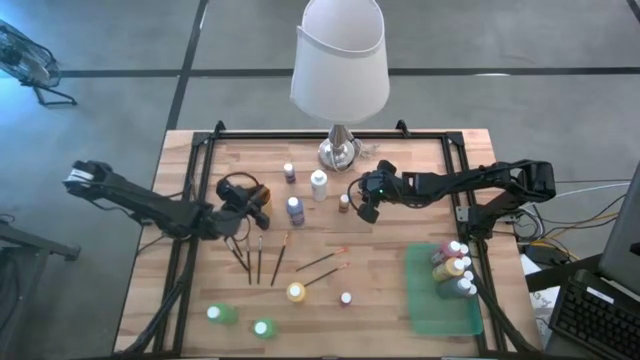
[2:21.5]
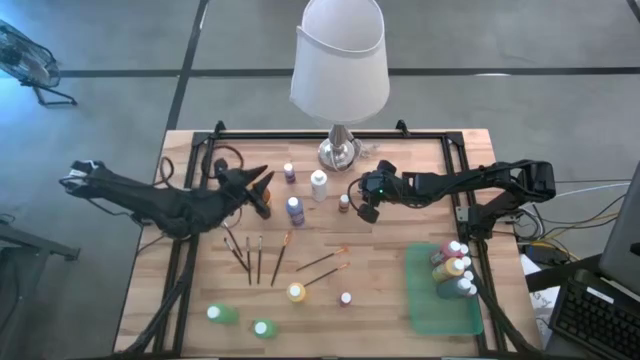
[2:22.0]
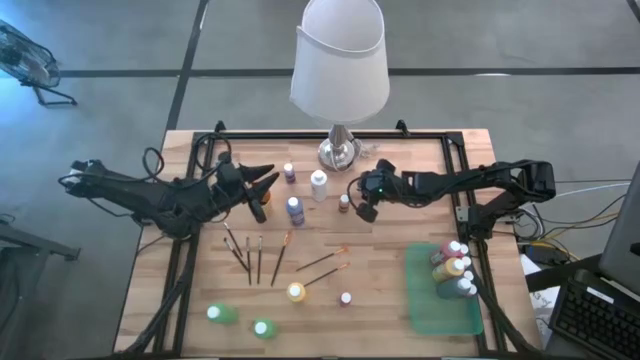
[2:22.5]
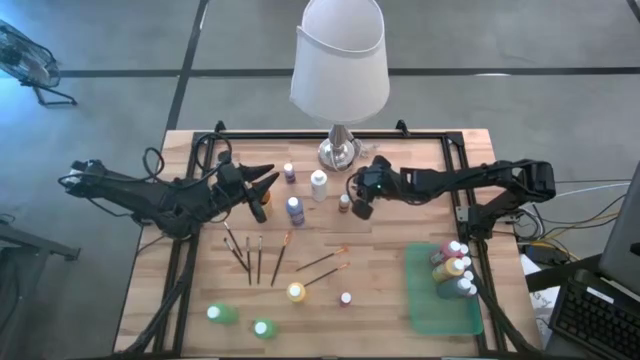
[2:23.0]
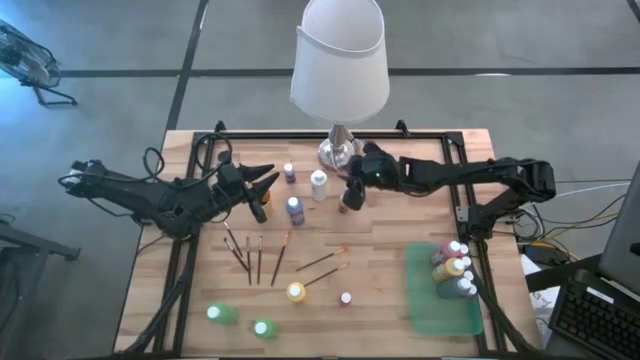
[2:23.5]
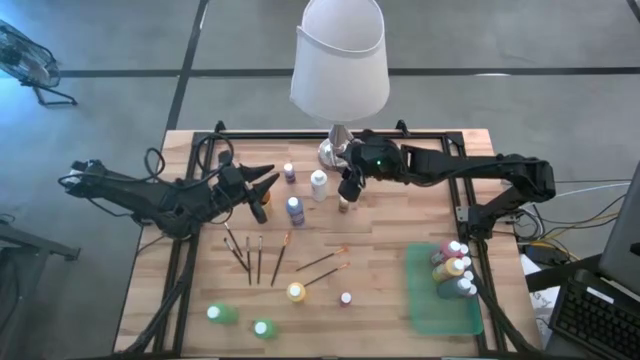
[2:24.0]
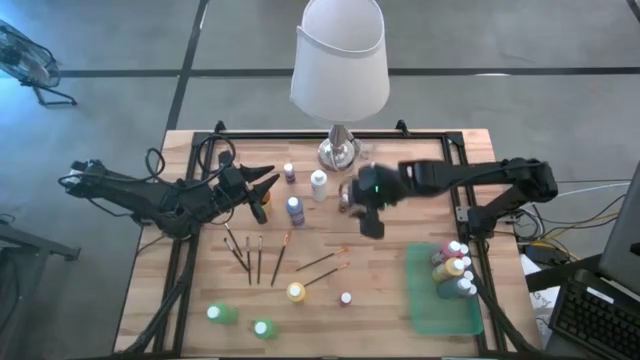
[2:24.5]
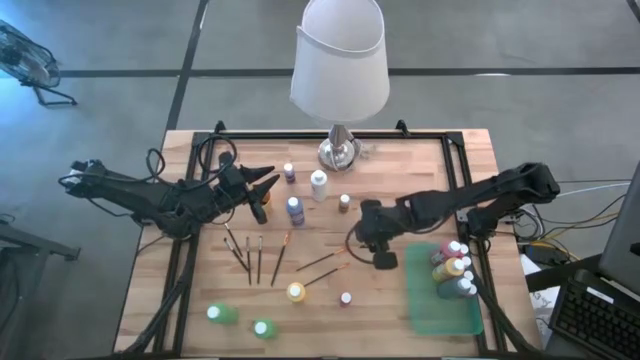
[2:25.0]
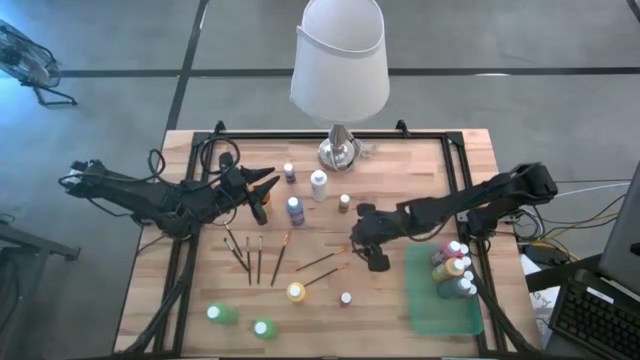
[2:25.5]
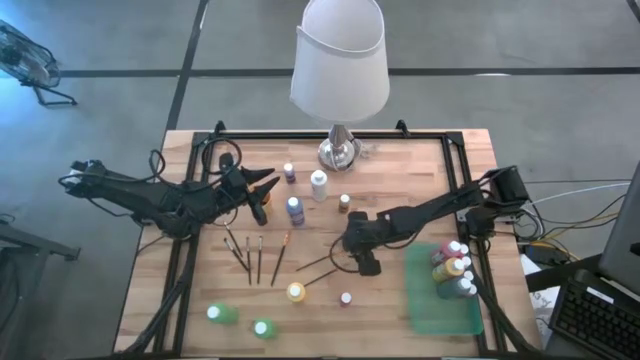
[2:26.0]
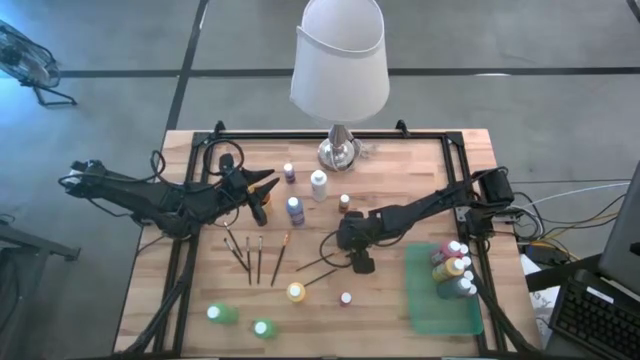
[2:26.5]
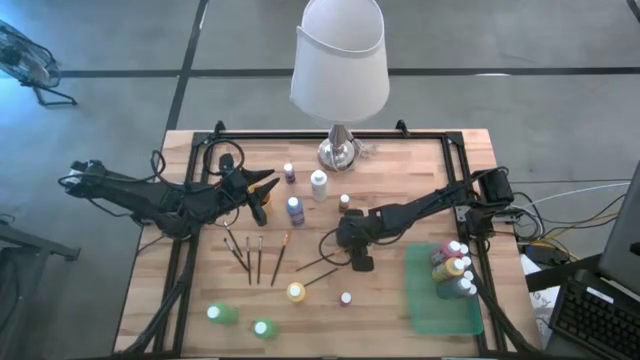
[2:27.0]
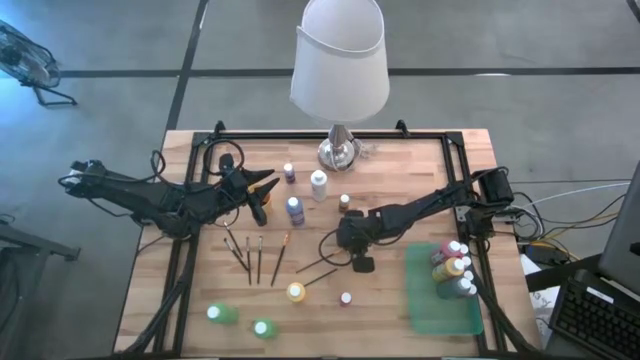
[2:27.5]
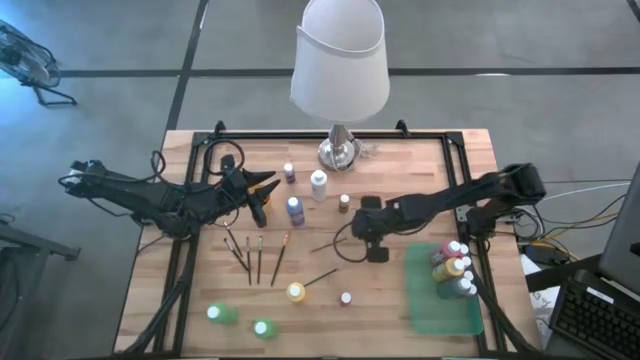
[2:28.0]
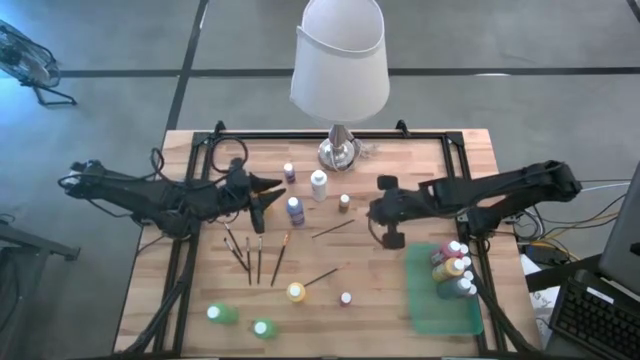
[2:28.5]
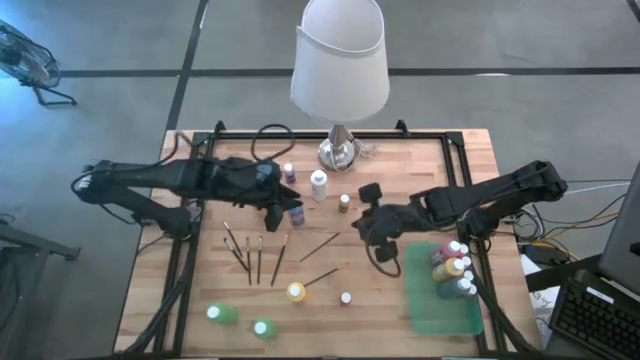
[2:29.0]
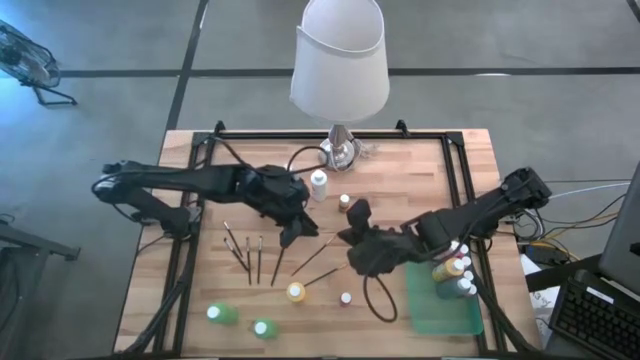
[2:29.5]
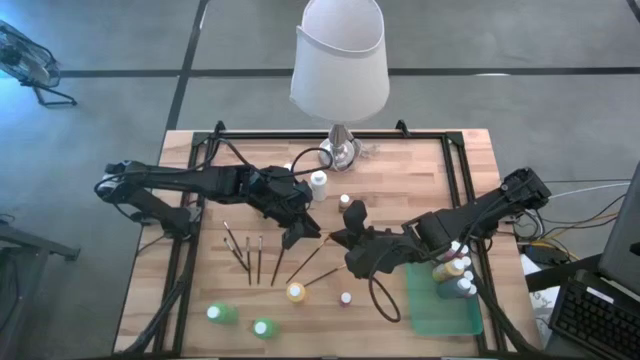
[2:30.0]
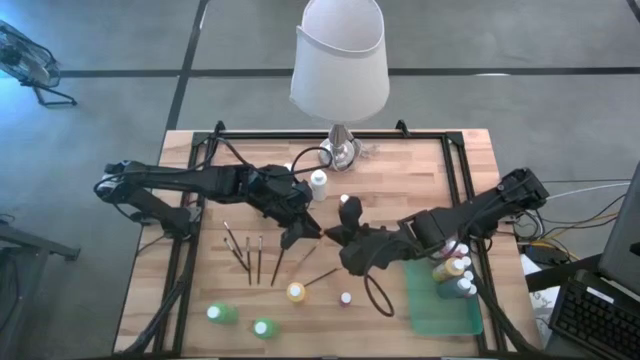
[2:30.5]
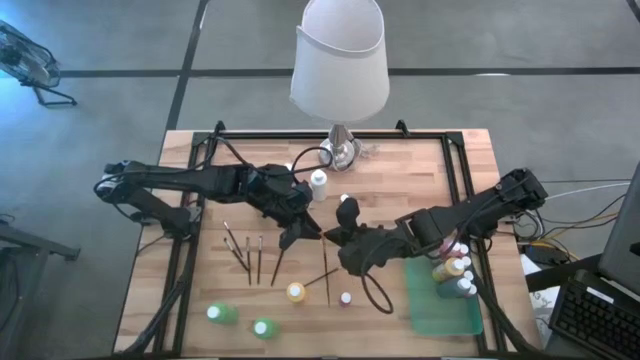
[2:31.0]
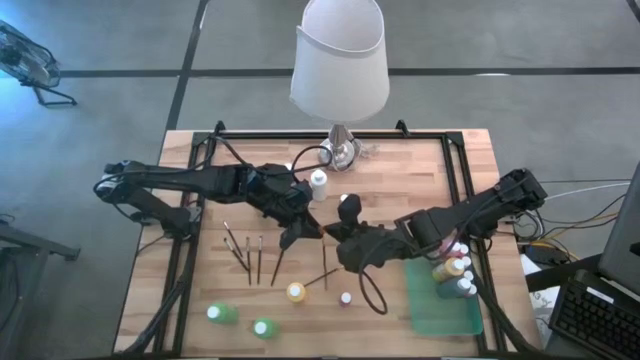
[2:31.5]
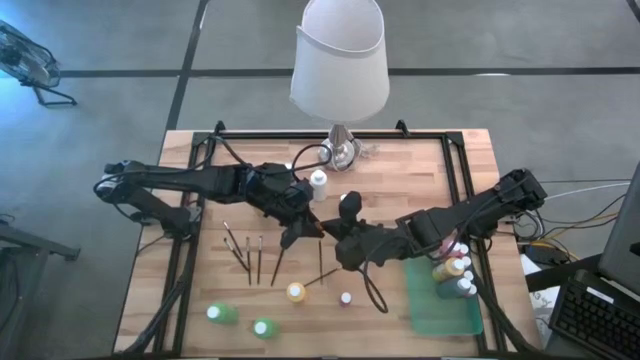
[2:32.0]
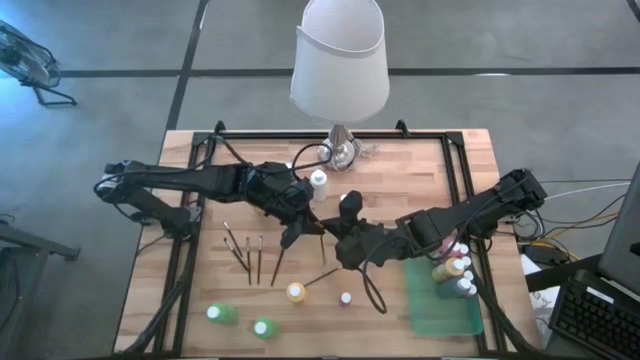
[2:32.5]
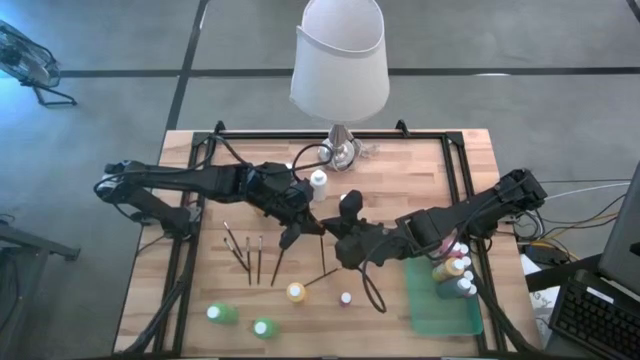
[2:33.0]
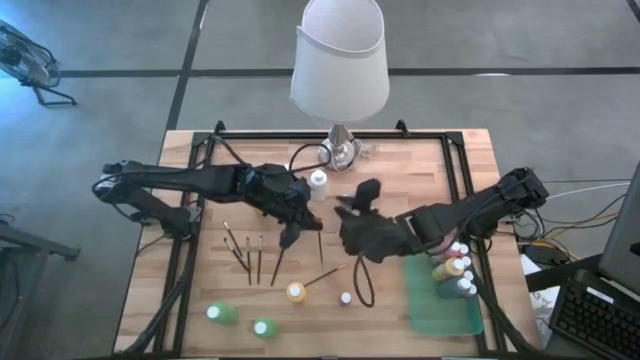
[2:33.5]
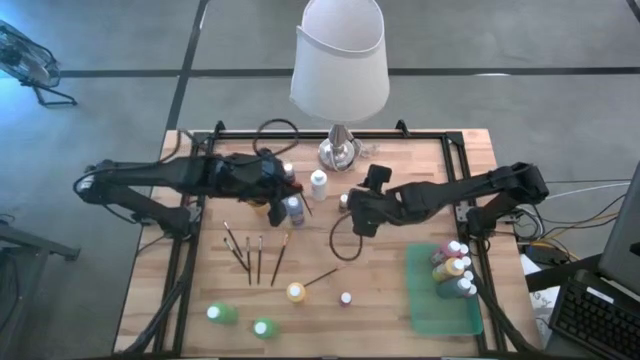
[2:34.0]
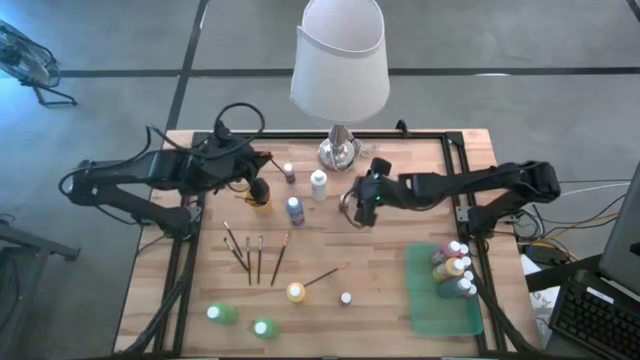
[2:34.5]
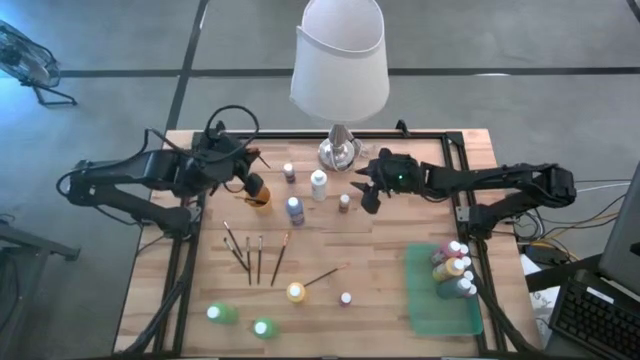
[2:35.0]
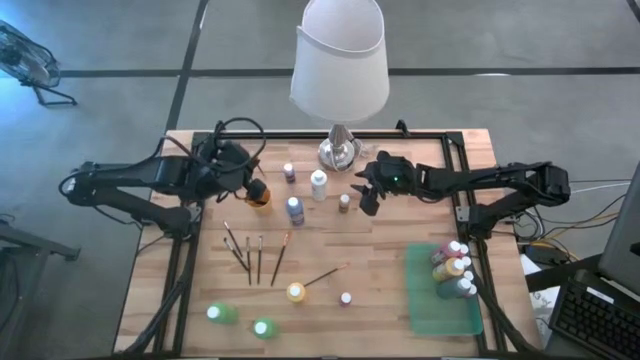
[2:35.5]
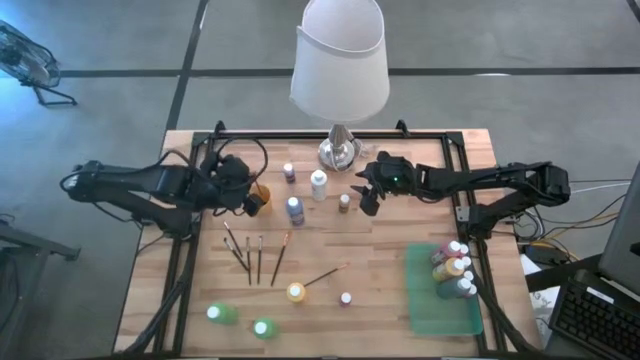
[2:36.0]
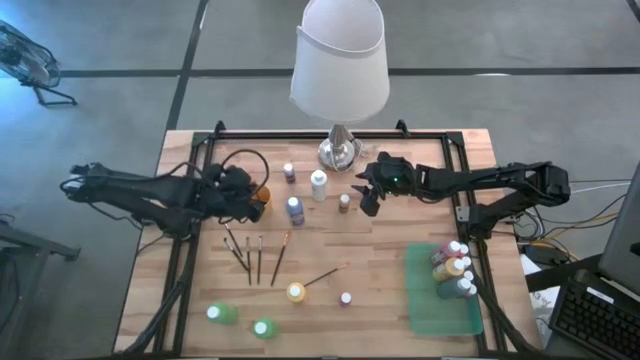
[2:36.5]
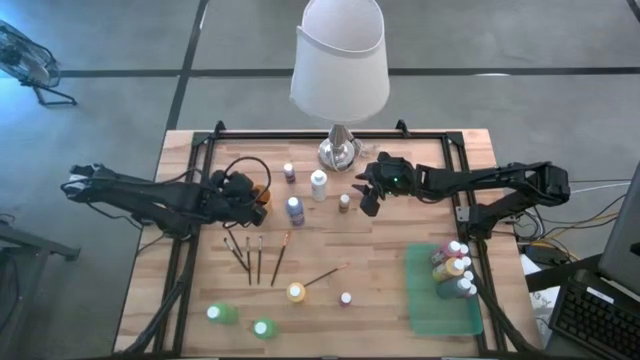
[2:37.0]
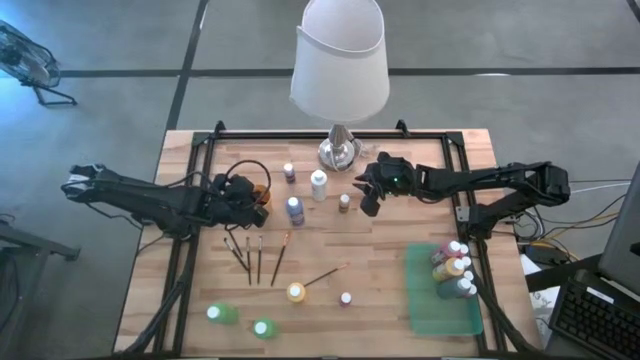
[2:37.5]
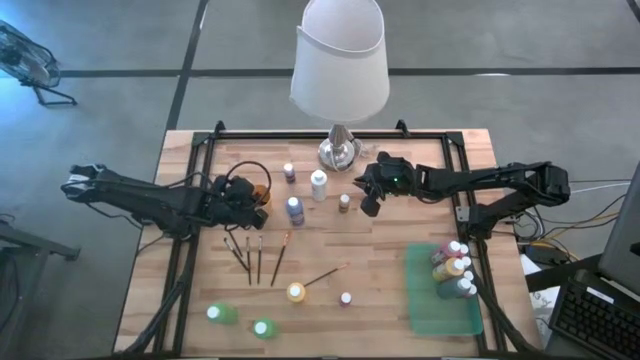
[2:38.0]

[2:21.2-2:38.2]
Task: Pick & Place Paint Supplies
Put the gold paint brush into the yellow cup

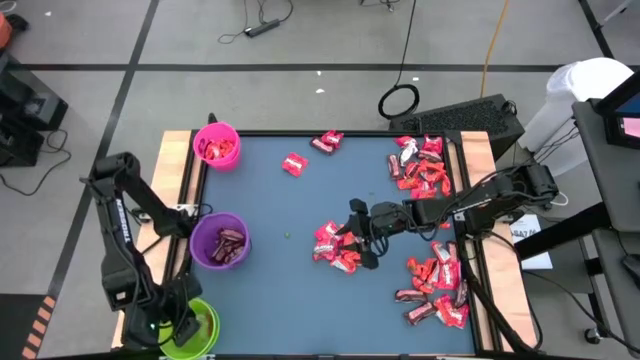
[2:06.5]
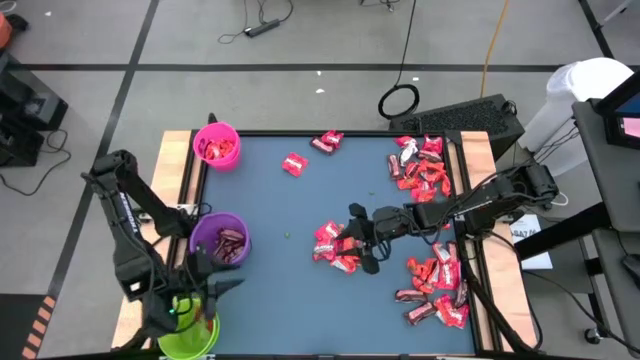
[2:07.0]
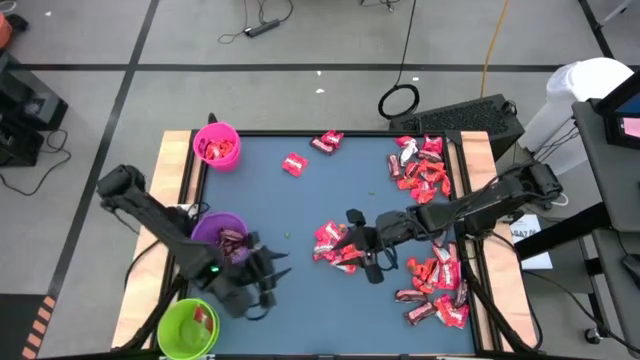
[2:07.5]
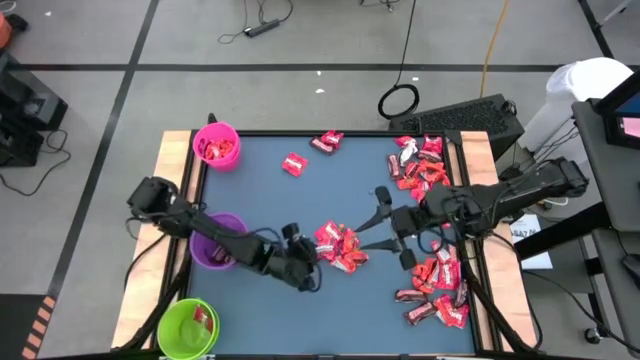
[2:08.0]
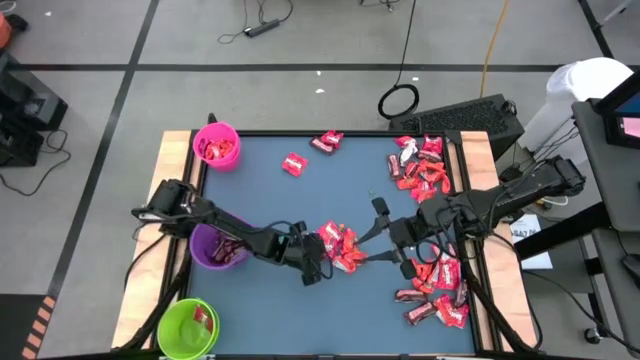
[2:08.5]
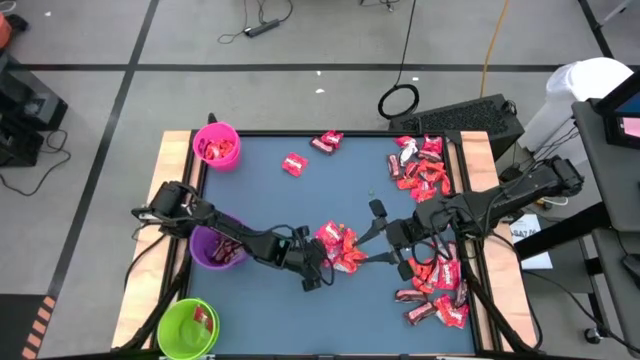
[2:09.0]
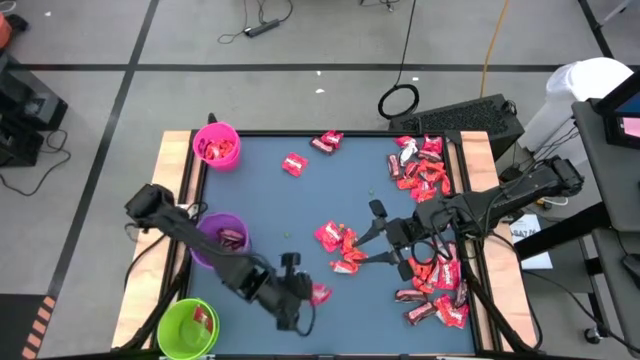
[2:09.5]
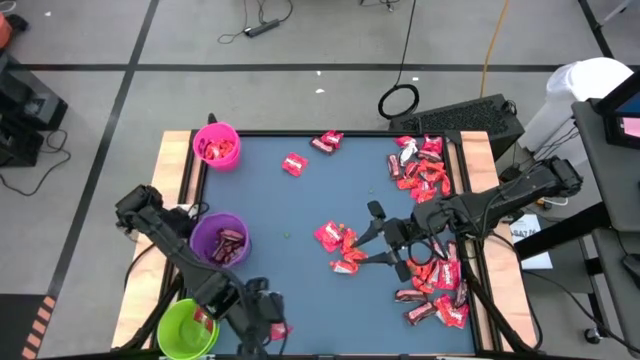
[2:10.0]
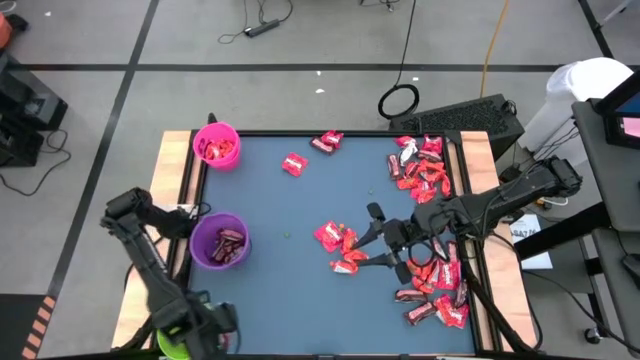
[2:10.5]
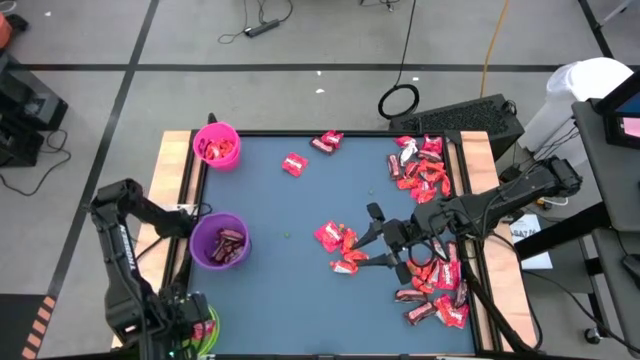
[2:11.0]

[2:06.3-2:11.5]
Task: Organize candy in baskets
Put the red candy into the green bucket
